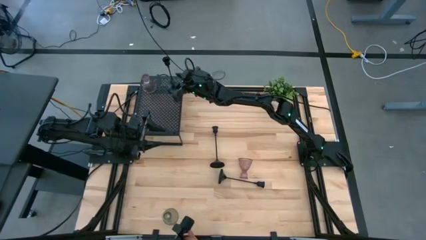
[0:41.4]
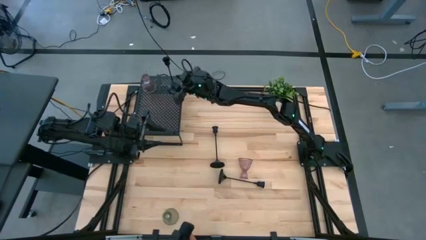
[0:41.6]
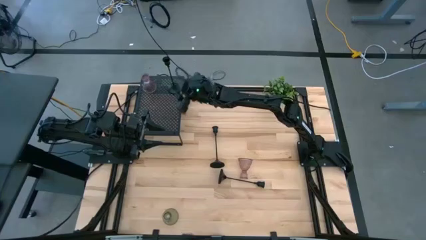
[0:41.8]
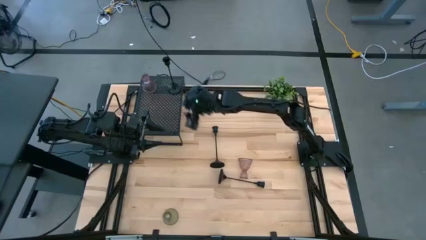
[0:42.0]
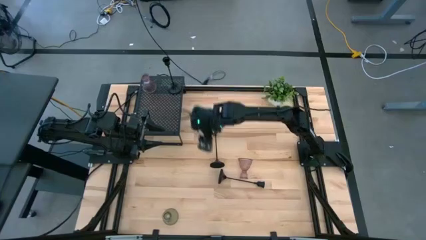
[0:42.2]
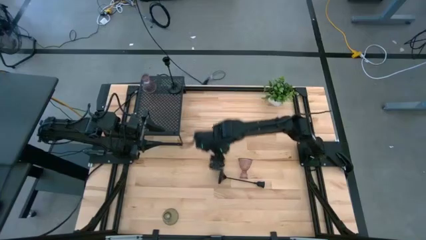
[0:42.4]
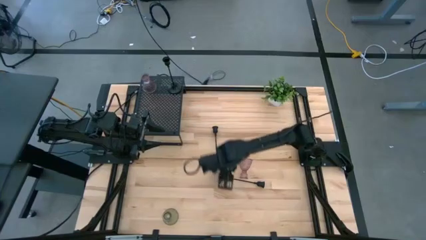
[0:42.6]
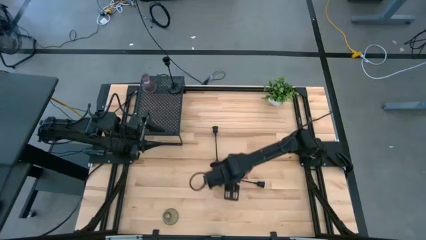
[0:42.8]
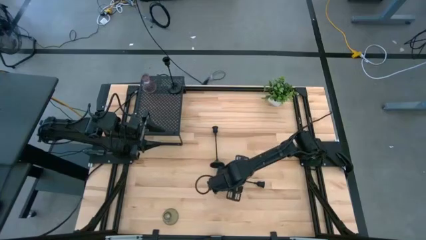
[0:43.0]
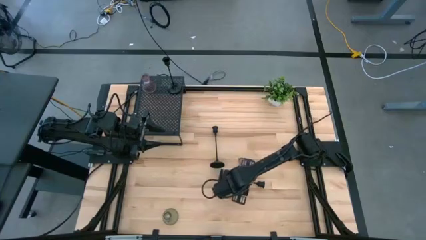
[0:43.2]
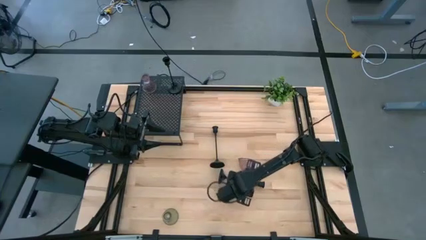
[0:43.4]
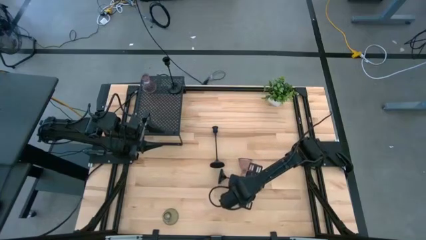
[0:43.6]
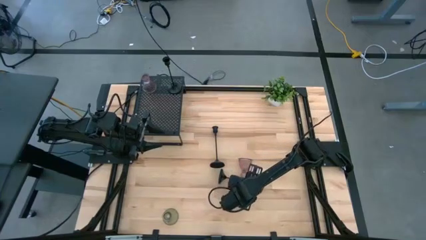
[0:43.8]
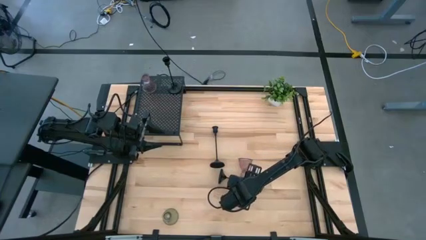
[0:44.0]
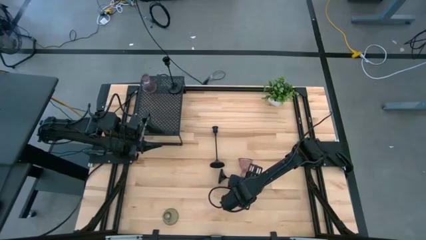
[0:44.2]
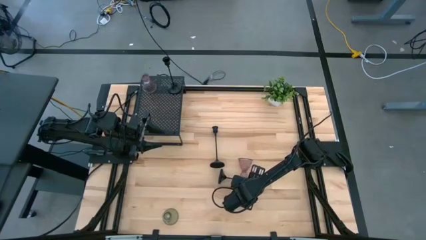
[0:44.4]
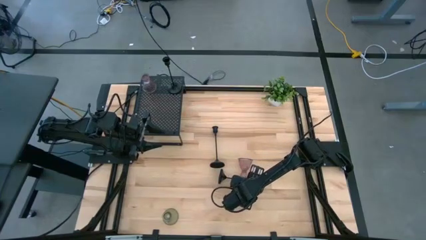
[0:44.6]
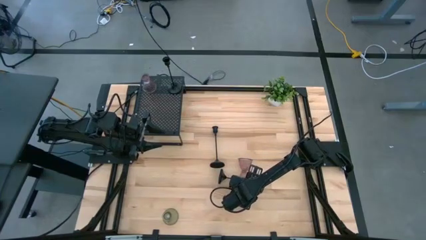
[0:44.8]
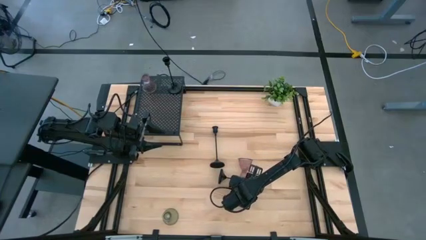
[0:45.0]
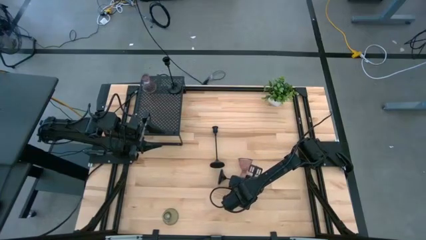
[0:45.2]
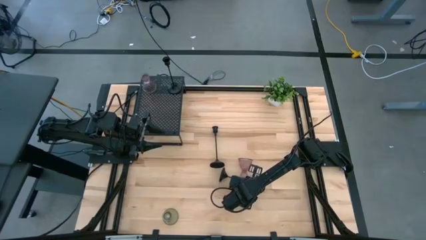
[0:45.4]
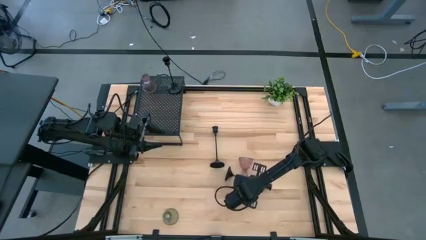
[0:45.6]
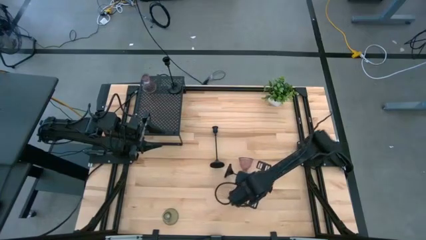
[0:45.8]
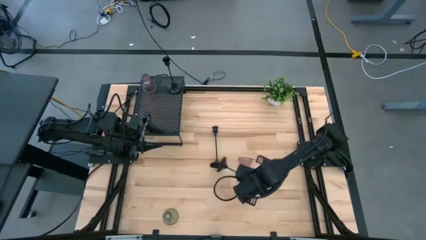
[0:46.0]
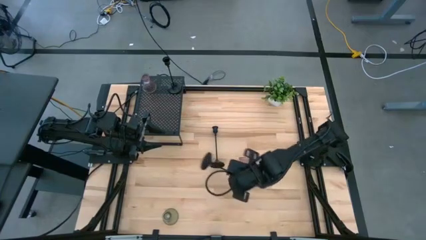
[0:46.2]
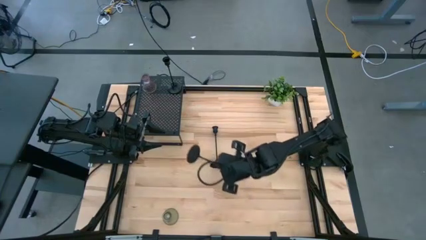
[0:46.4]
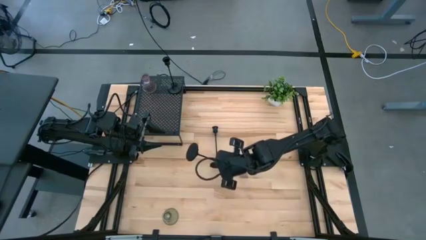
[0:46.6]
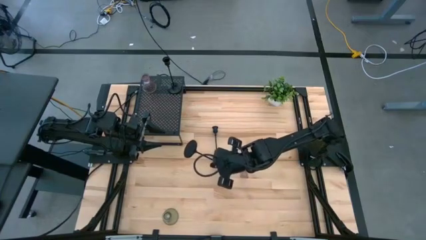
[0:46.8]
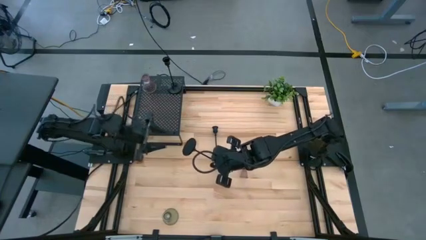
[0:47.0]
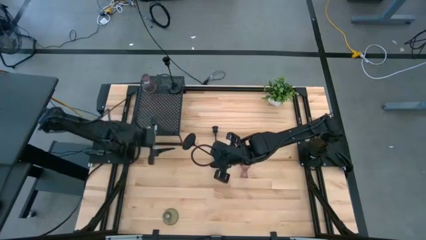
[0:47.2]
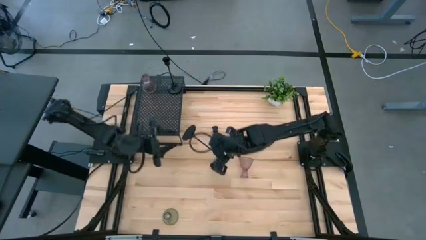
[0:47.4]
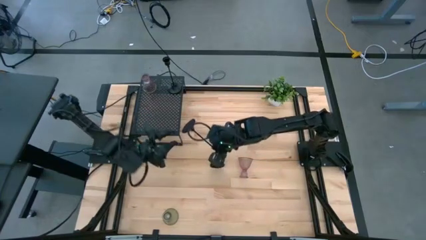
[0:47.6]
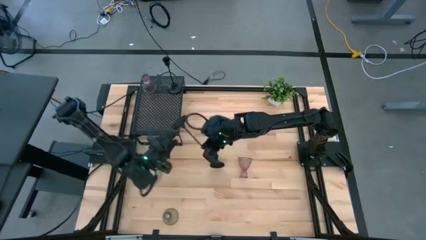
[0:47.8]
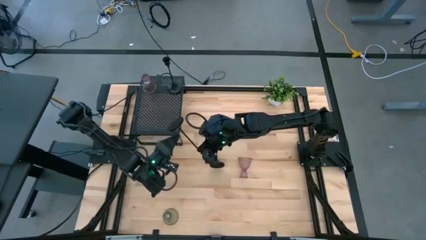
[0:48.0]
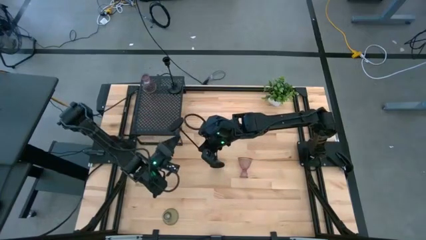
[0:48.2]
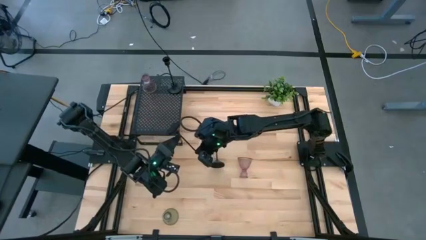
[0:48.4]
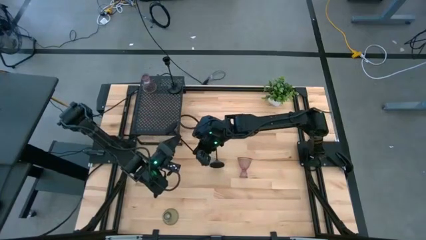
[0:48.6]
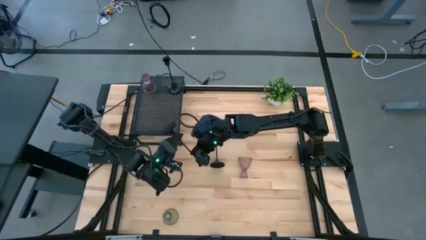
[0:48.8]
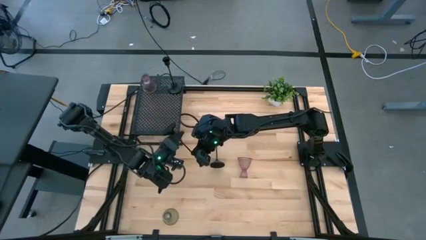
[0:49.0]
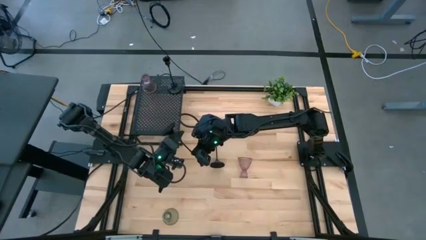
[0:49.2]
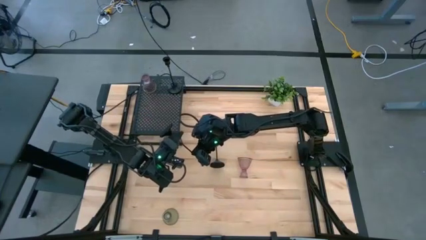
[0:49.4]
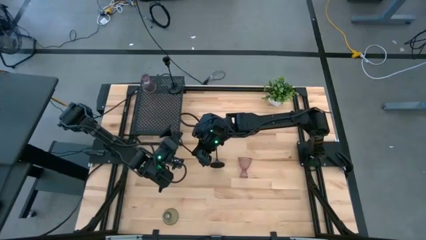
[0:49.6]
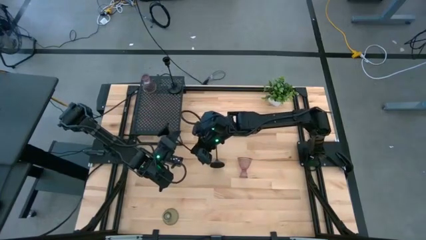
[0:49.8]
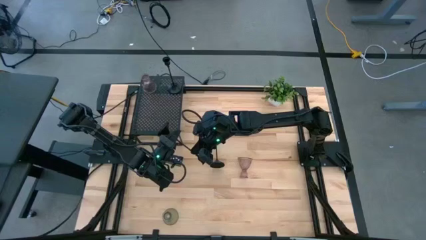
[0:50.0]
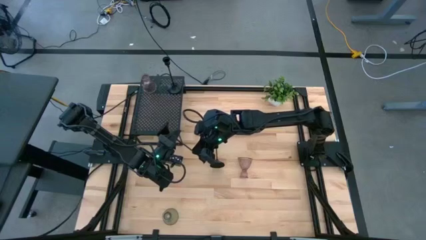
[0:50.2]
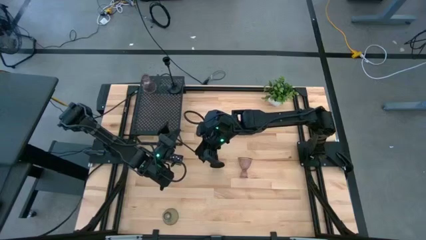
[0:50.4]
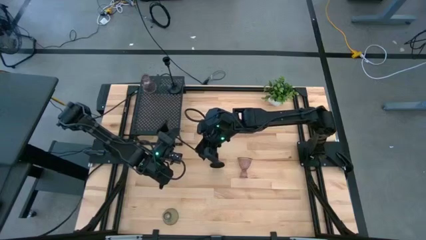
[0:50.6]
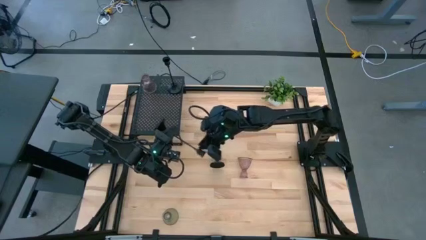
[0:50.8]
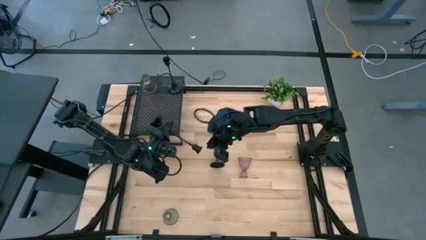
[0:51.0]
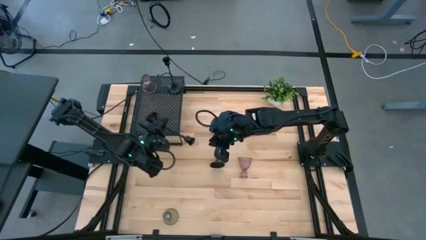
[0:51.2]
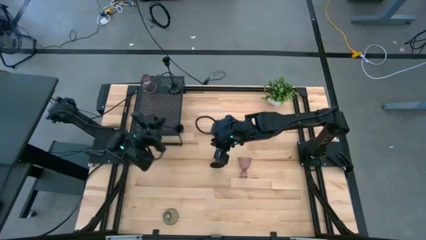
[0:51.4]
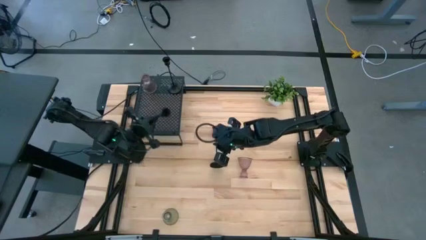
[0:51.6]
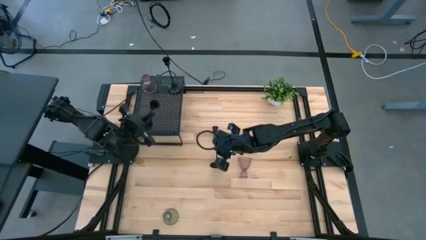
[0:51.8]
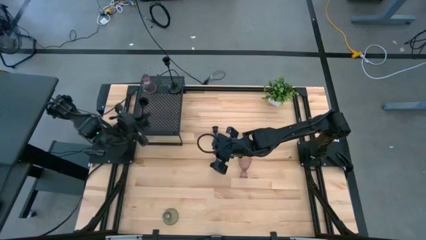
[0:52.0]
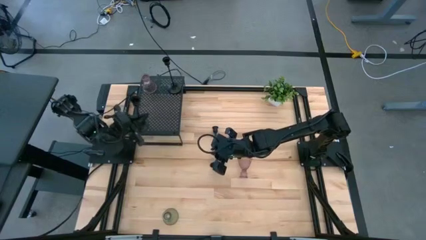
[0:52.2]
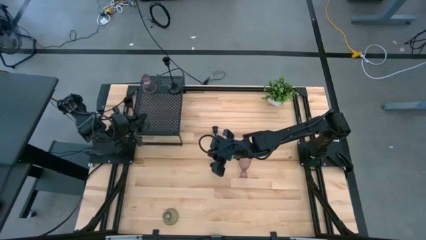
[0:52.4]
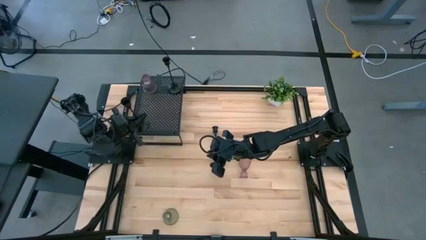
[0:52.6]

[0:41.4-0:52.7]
Task: Pick & Place candle stick holders
Align the right black candle holder with the other black candle holder on the shelf

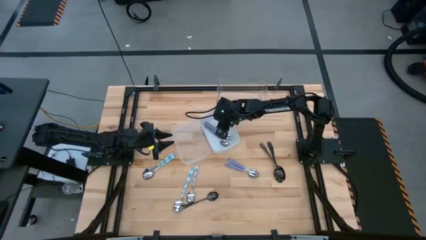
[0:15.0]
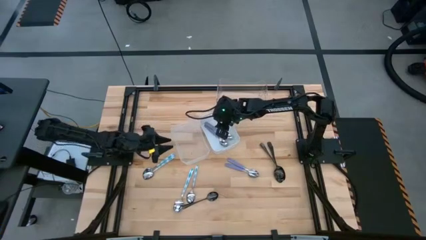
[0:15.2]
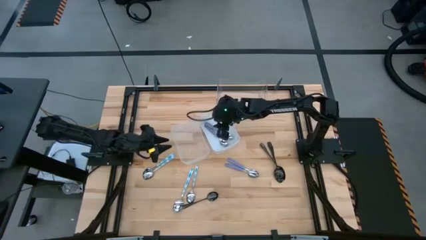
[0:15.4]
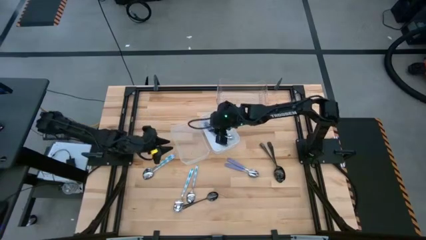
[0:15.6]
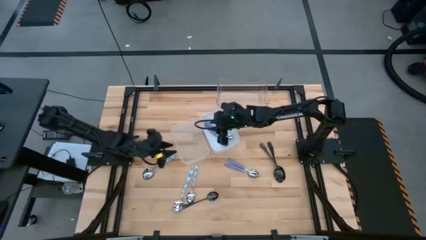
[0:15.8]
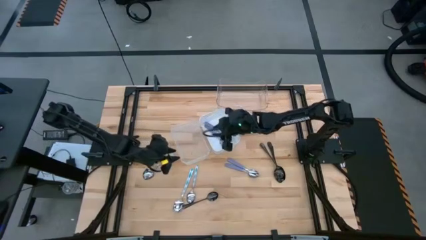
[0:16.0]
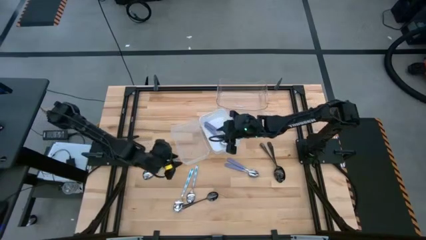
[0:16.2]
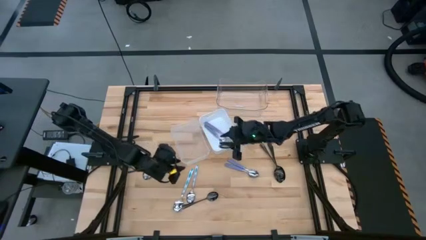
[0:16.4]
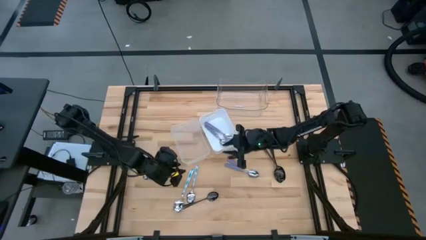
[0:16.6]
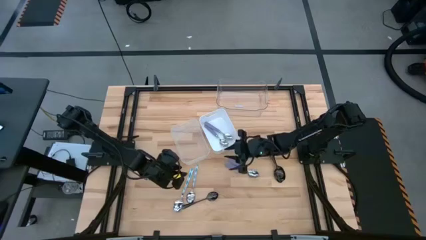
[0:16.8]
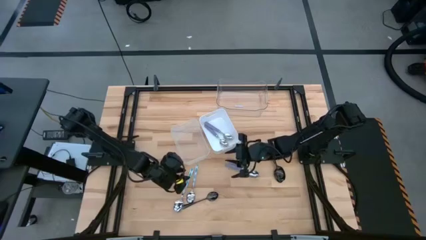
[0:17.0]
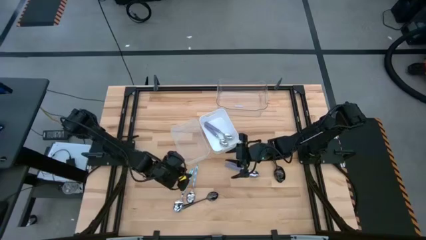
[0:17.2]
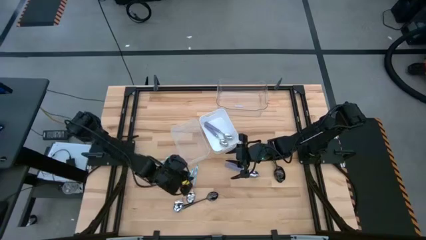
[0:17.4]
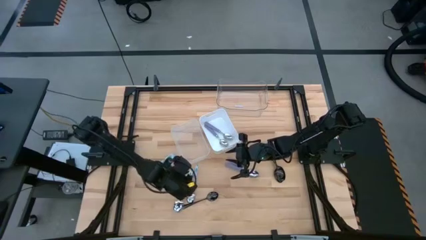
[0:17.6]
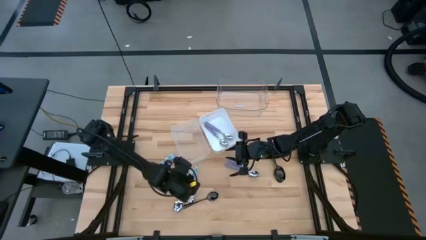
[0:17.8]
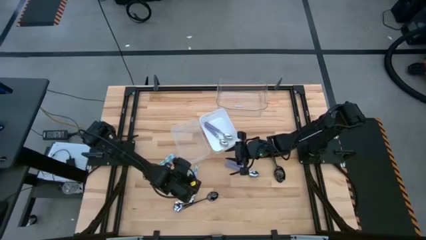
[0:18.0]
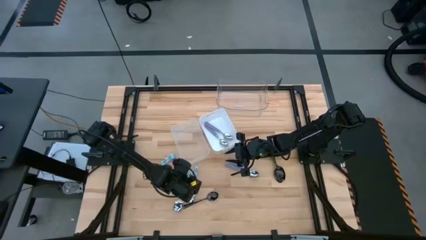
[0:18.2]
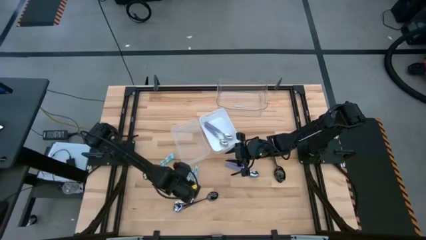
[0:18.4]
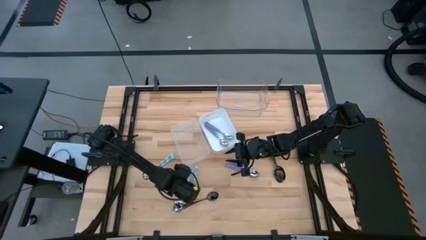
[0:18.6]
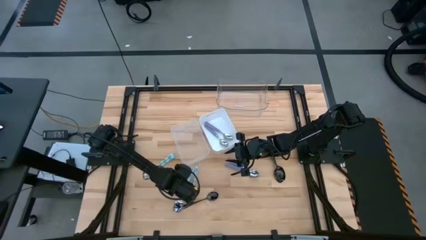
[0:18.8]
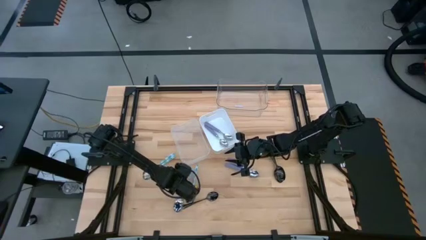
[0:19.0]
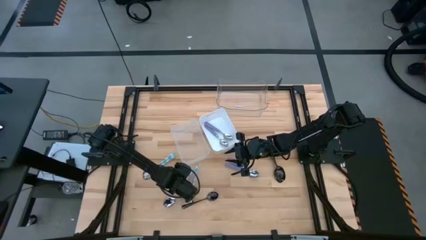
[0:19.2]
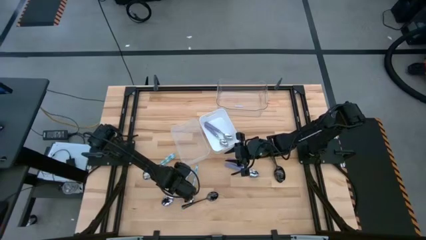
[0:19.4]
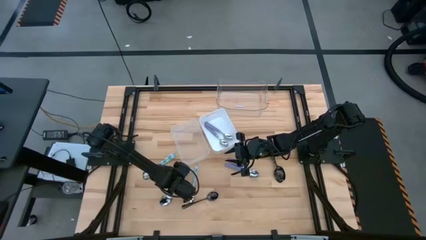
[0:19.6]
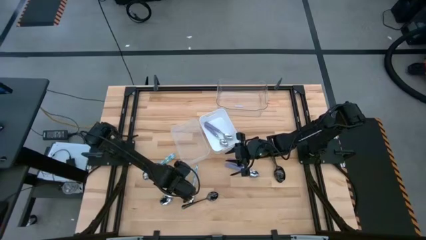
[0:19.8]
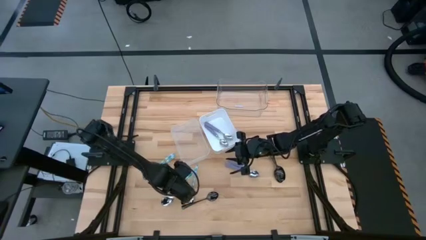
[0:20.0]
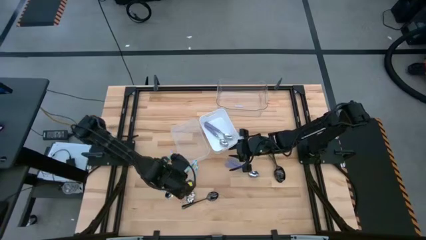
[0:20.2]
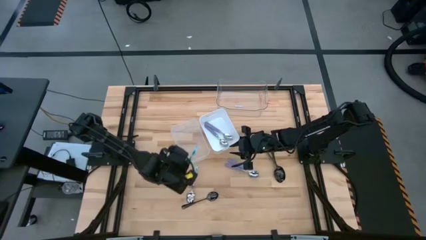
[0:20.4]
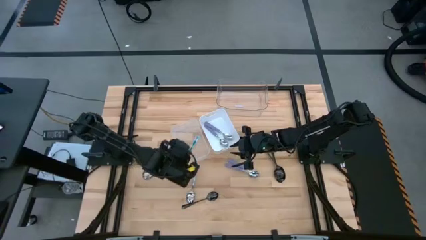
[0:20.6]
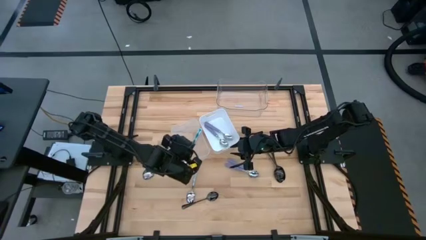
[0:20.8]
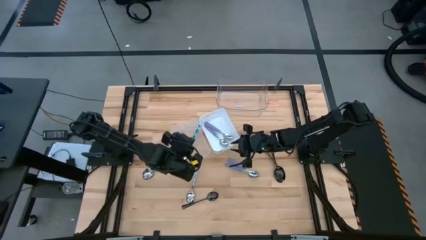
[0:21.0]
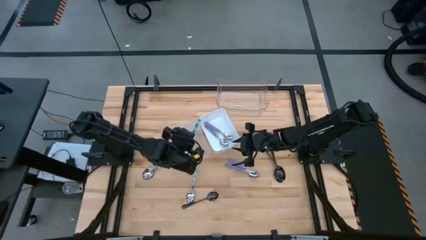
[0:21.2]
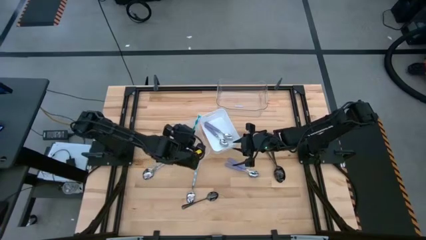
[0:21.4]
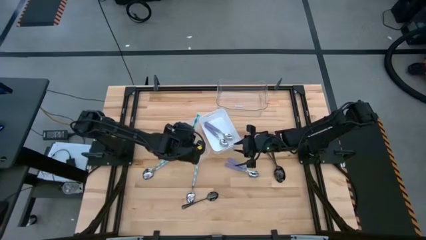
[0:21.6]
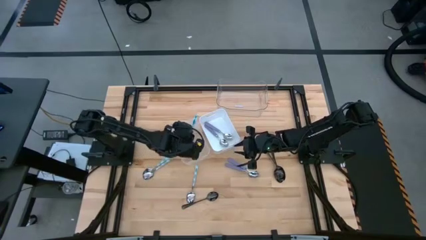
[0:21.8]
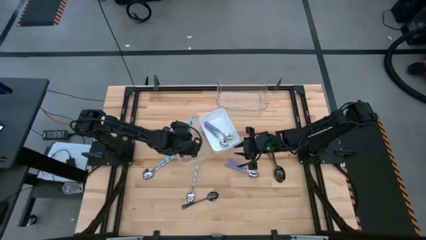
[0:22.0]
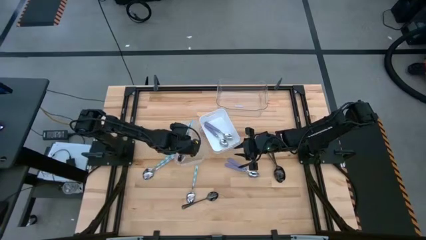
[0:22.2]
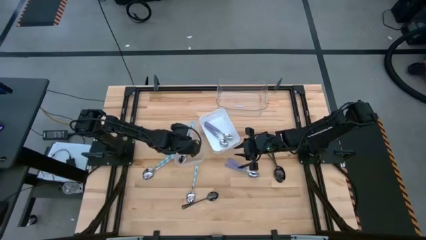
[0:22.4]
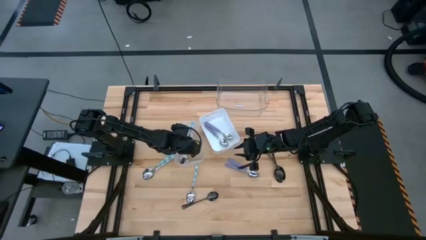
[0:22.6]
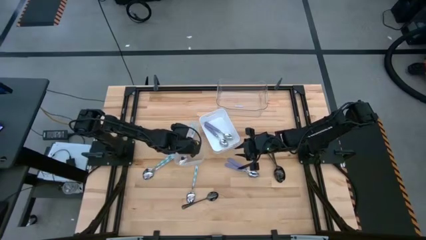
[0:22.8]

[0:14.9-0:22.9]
Task: Sort silverware by color (type)
Put the white-green patterned spoon into the bottom transparent bin
